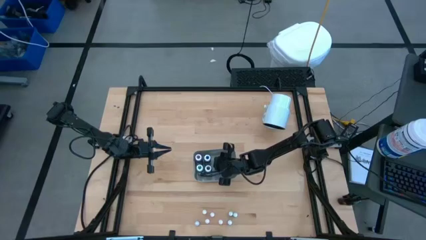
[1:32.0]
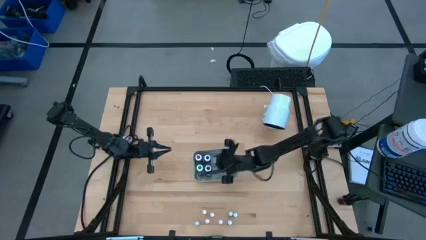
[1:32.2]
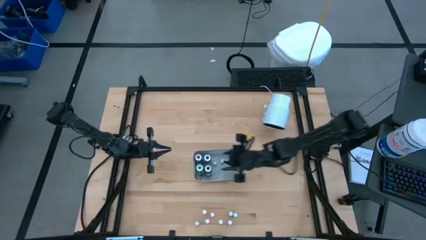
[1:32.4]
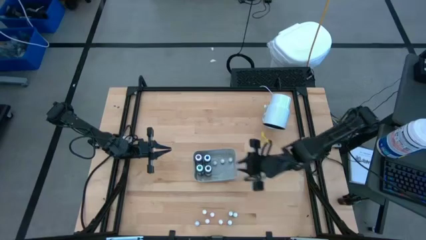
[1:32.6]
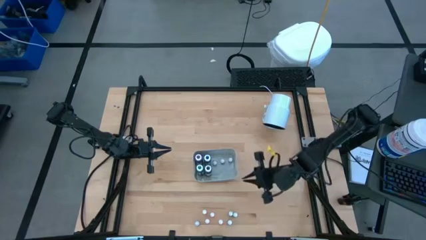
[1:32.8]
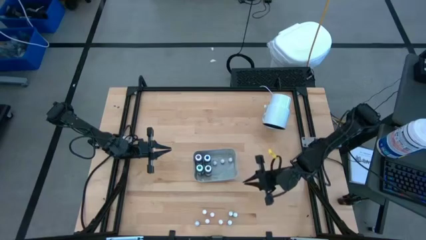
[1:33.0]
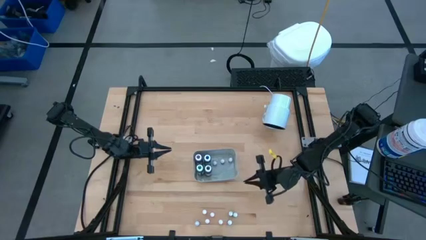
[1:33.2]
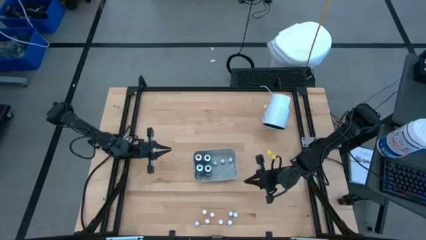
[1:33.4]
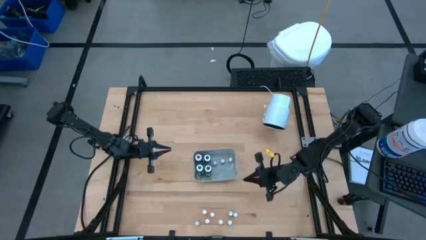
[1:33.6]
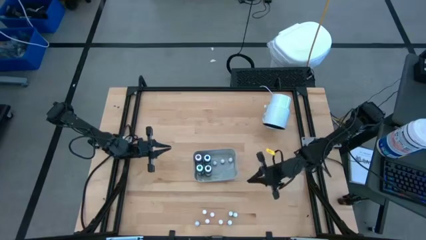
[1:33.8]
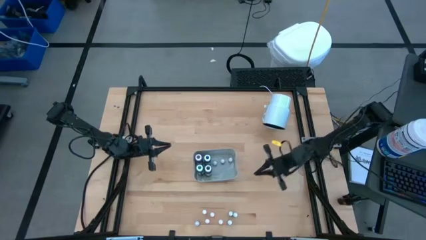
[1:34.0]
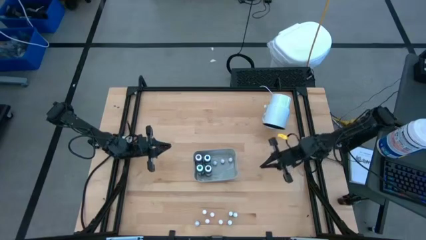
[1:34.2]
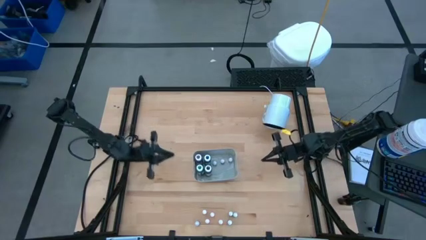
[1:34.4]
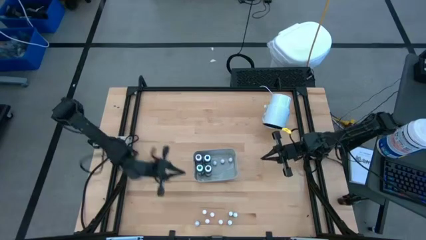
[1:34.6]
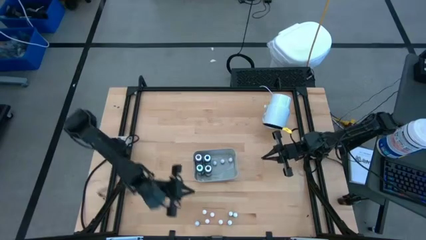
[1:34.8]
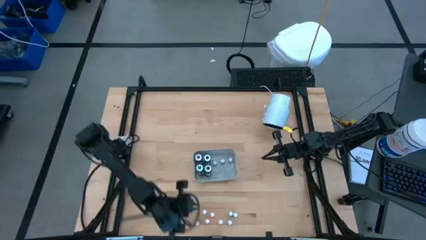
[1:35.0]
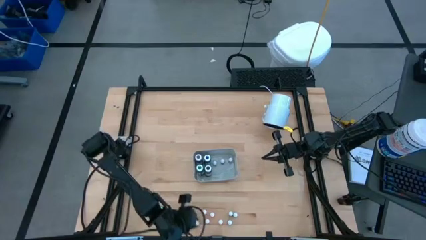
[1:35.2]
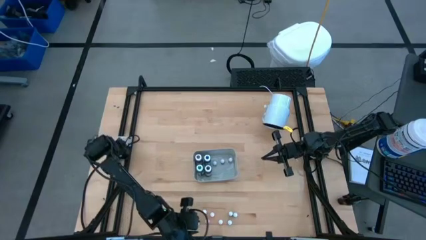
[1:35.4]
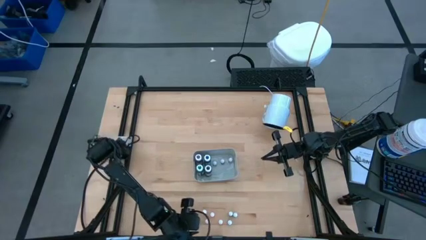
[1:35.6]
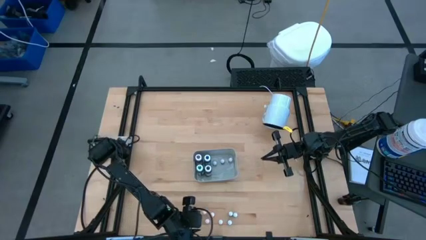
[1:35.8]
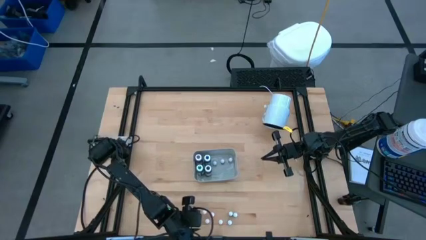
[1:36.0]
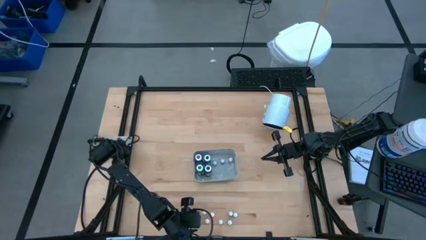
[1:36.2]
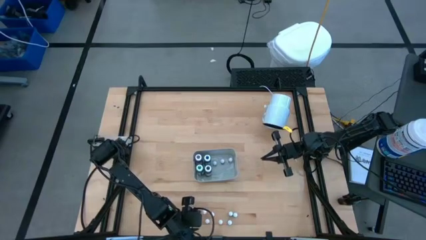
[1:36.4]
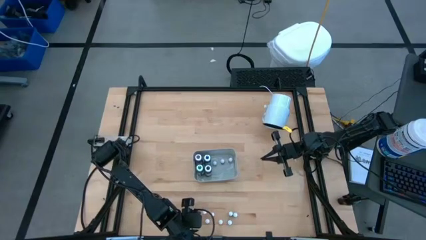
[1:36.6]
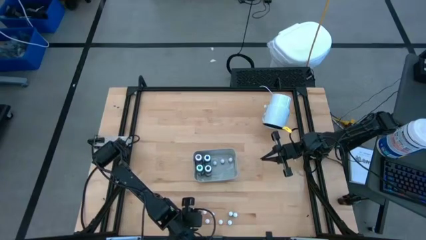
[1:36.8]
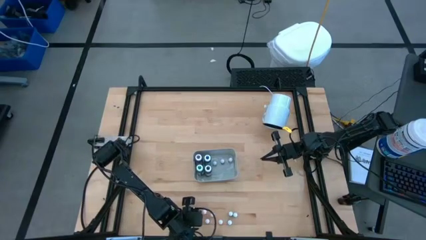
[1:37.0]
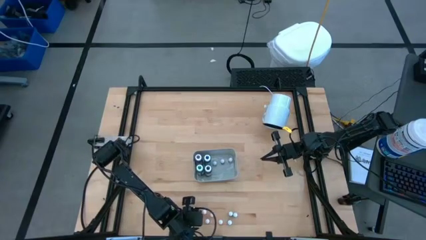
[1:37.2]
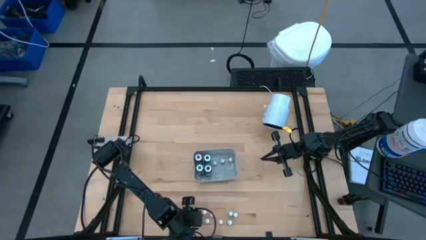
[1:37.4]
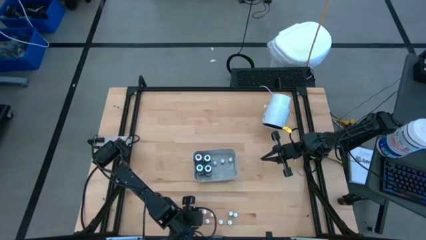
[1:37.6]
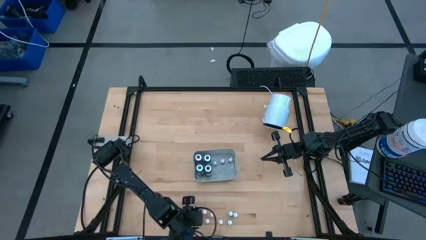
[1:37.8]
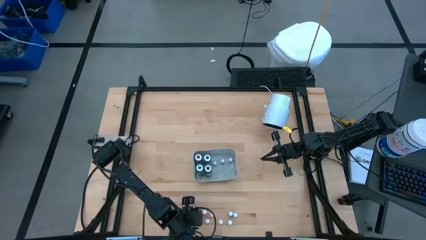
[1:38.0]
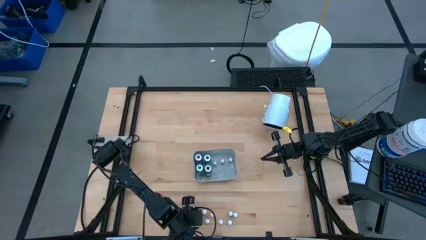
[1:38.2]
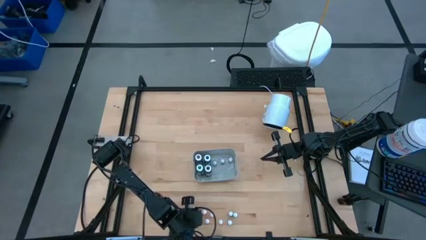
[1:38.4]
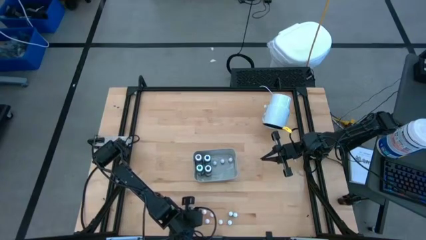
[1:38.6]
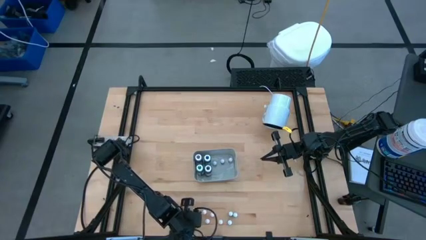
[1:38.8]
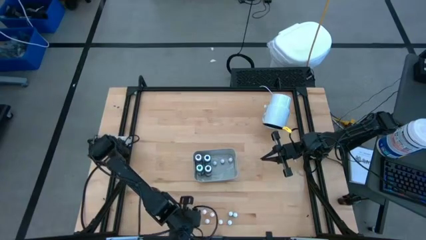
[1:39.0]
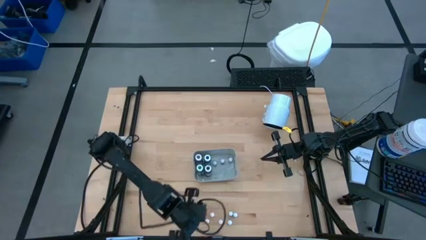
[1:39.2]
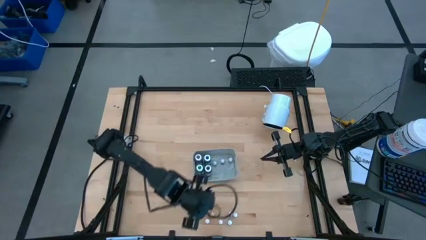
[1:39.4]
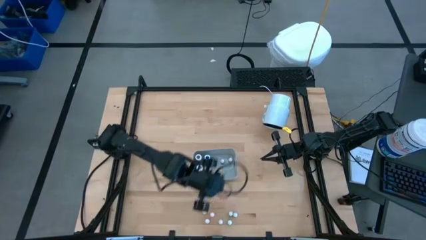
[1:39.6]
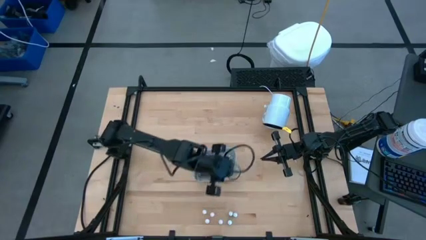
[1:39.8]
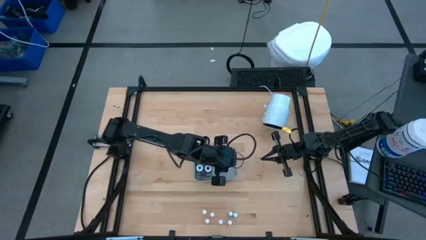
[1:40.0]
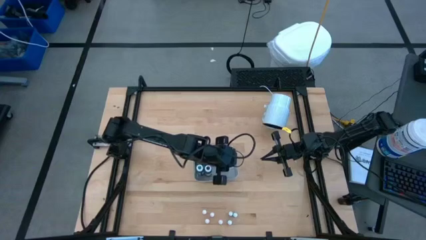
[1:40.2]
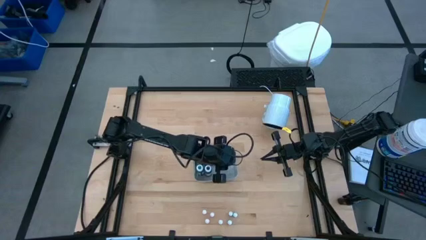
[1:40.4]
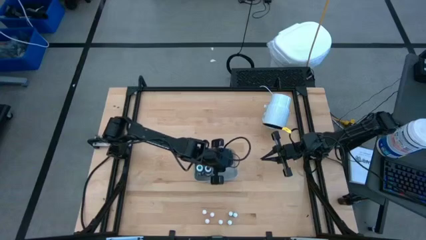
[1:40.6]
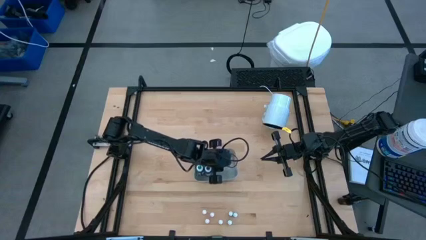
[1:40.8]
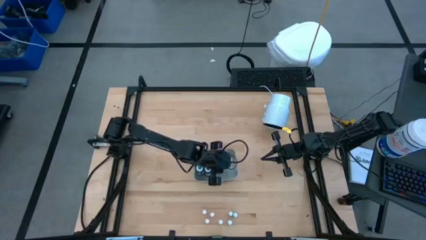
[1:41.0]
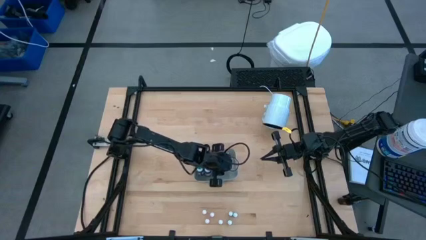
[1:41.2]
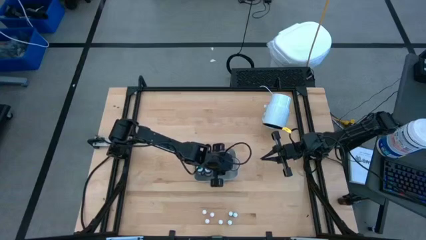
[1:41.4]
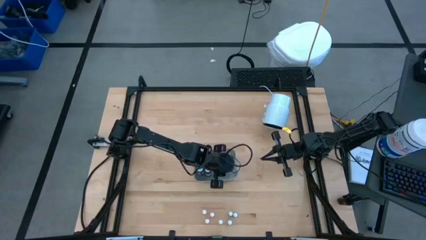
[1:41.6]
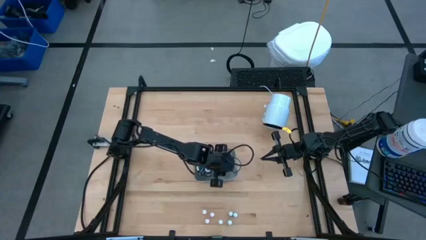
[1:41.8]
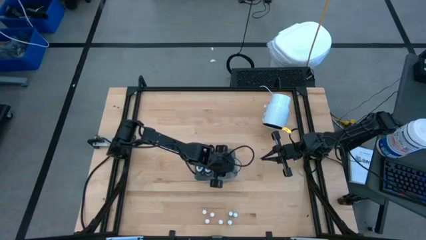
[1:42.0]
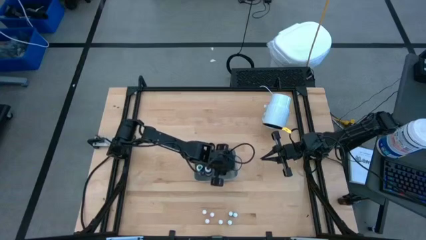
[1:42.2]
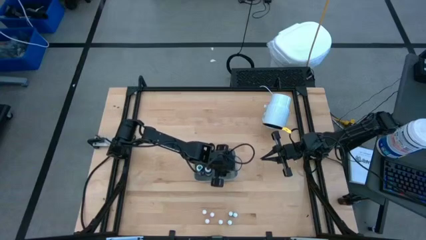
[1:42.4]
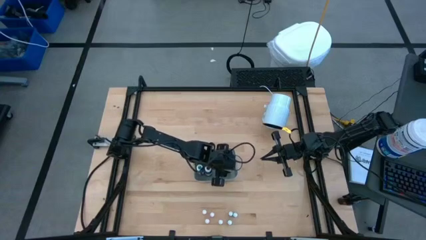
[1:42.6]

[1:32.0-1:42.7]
Task: Pick & Place food coloring
Put the small black food coloring bottle into the gray bin

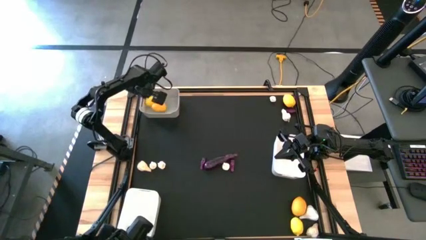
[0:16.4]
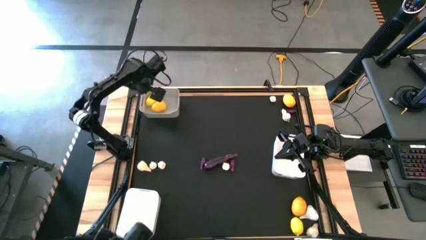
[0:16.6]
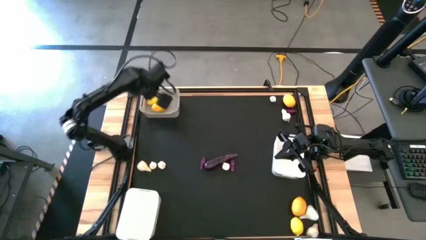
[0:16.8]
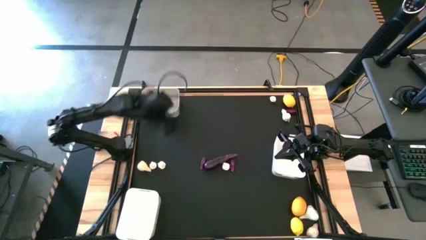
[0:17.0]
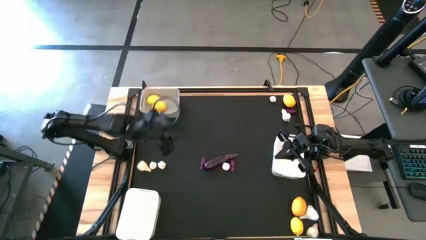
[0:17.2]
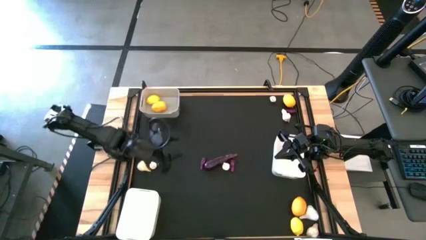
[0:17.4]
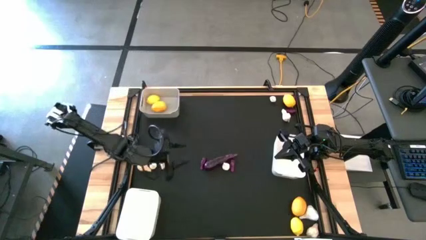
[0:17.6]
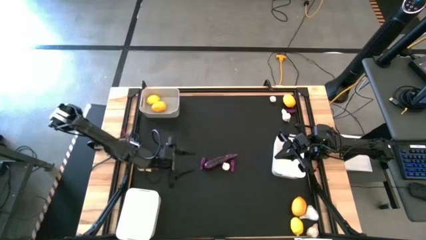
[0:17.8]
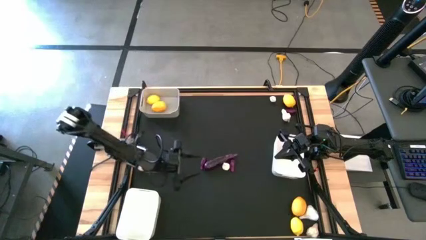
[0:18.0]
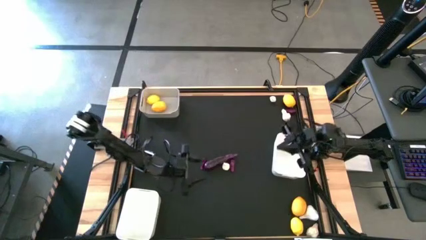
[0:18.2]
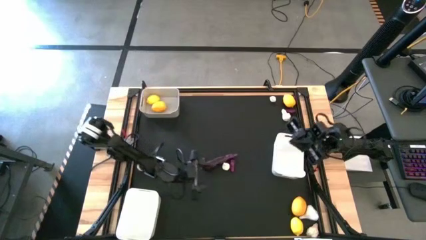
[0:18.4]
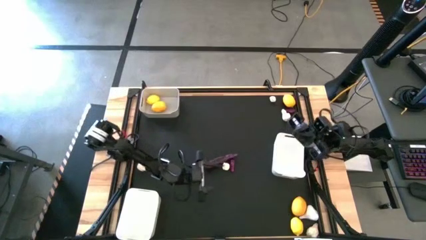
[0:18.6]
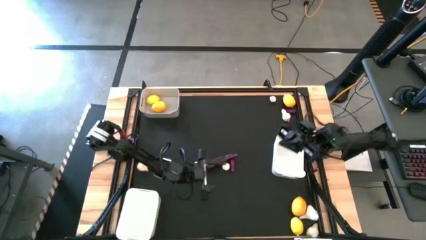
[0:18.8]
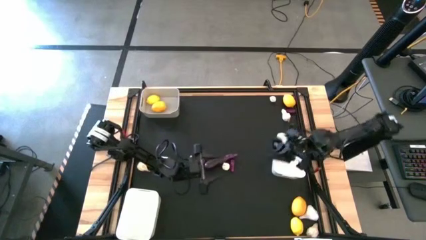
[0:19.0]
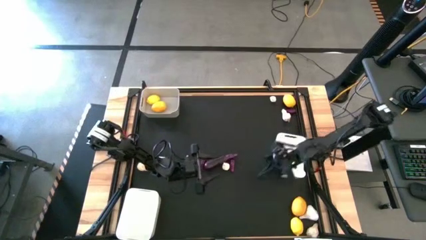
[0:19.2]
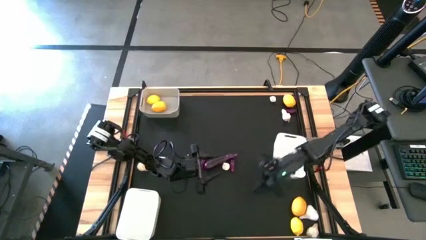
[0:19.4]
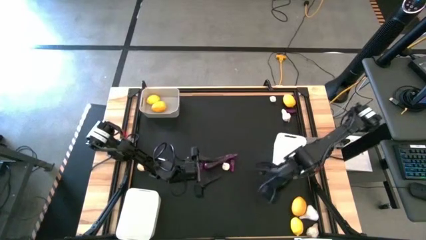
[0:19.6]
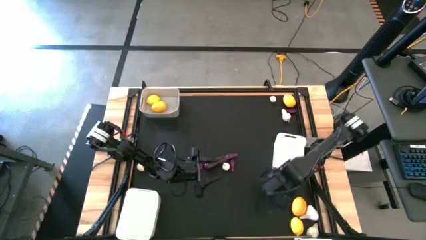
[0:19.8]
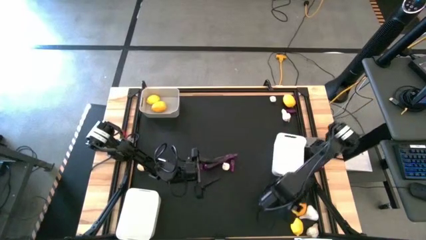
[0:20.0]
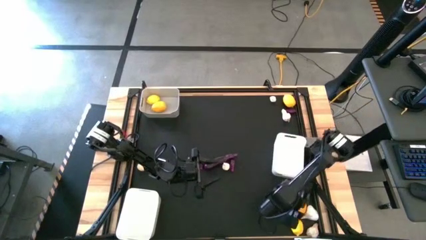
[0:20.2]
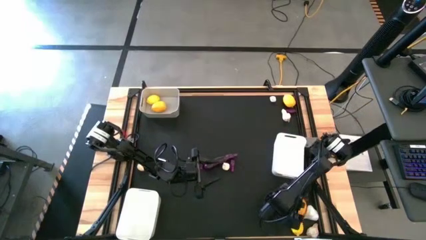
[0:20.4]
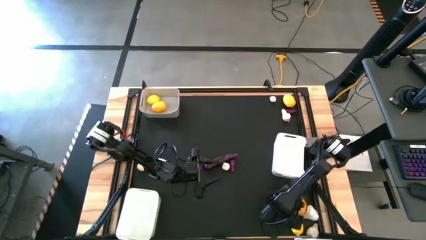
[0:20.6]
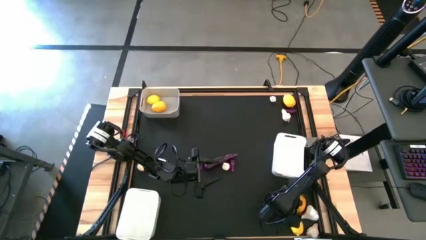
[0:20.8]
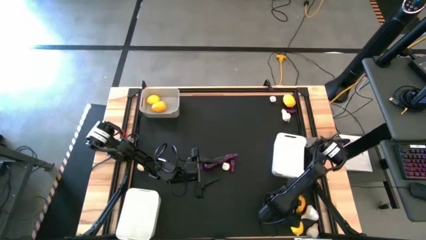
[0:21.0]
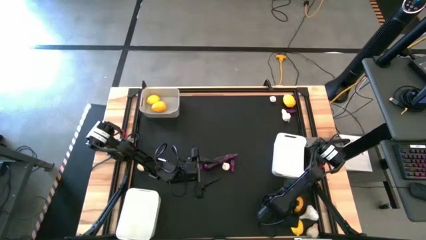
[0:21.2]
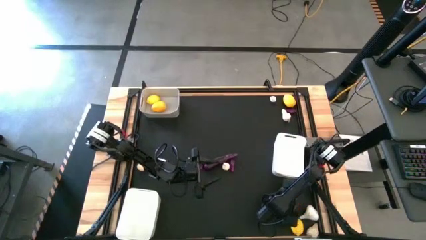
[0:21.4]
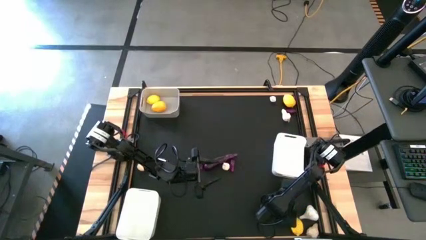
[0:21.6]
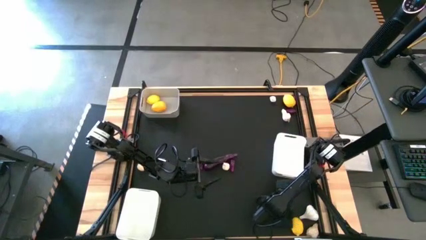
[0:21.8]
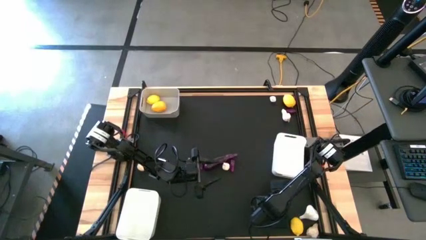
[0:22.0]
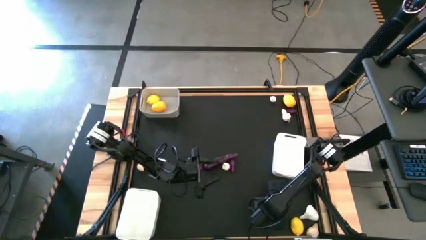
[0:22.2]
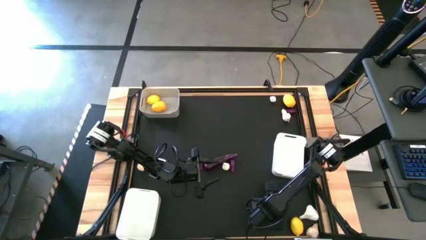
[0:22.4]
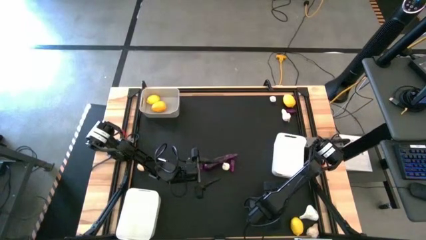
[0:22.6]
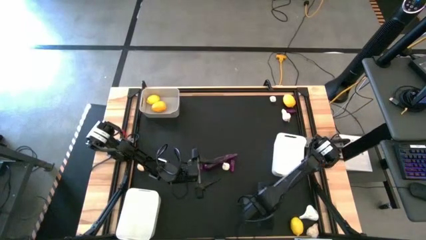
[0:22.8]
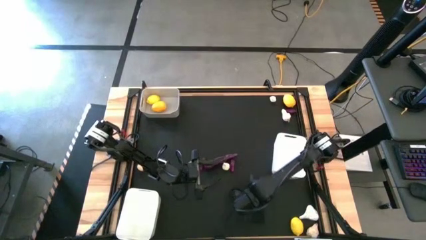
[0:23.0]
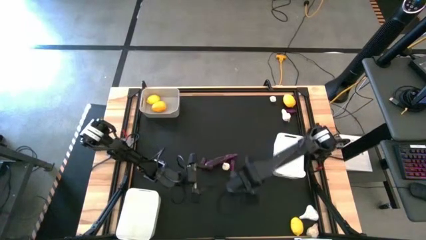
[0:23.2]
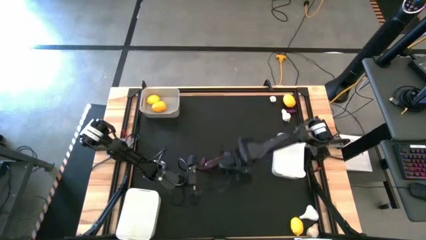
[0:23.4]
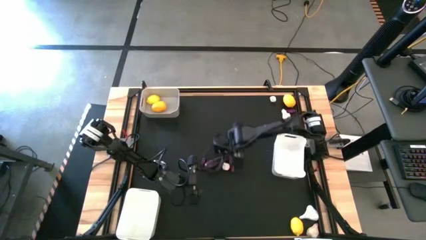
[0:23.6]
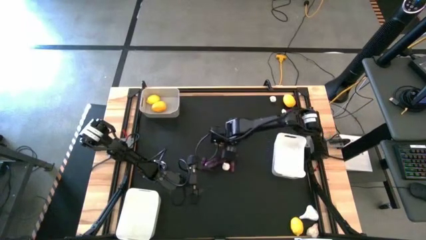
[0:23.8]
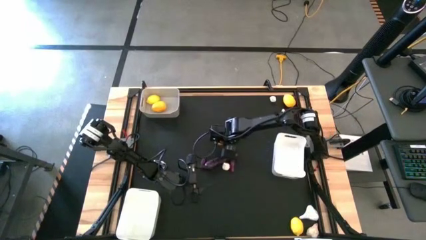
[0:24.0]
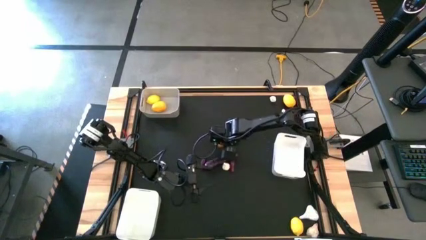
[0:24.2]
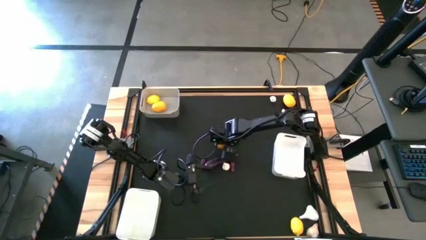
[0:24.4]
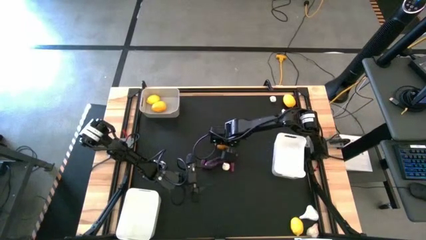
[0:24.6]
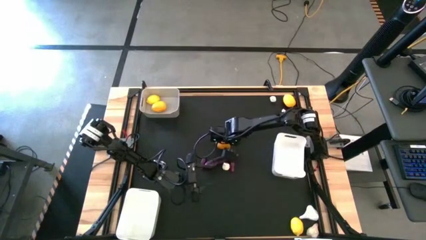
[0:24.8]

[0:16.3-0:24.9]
Task: Sort produce into baskets
Move the middle right lemon to the center of the table
